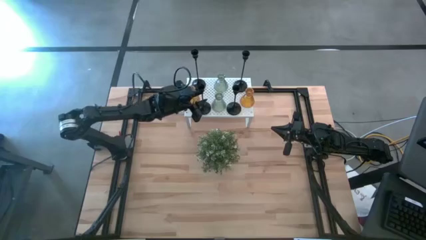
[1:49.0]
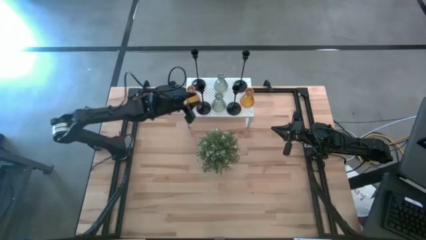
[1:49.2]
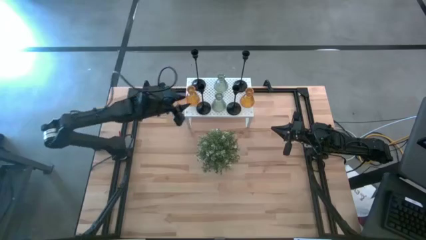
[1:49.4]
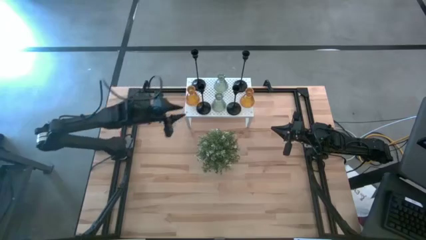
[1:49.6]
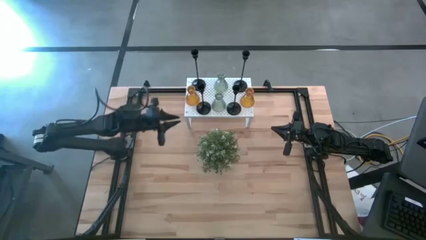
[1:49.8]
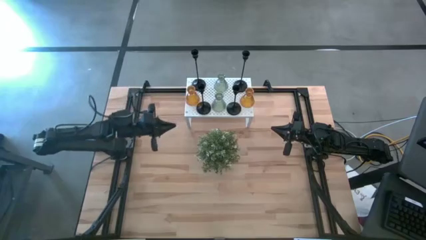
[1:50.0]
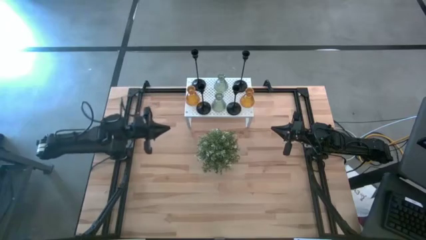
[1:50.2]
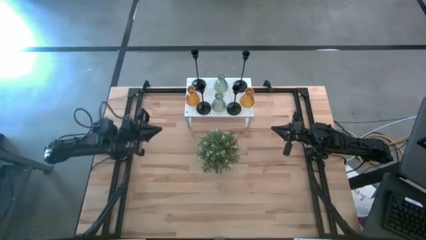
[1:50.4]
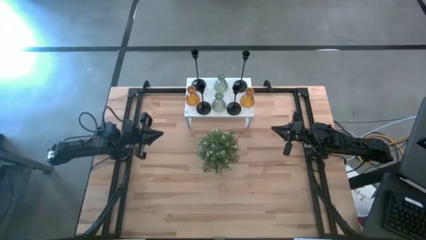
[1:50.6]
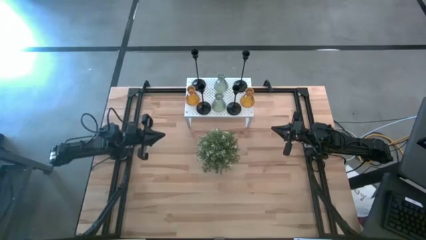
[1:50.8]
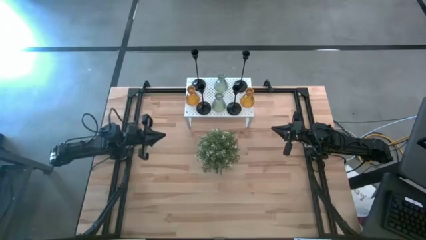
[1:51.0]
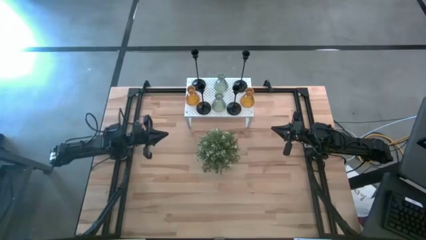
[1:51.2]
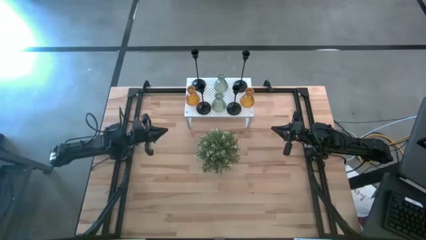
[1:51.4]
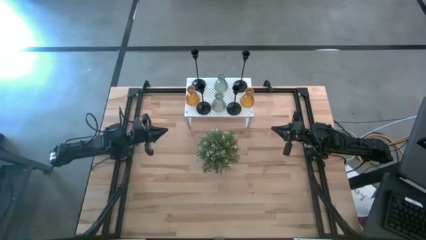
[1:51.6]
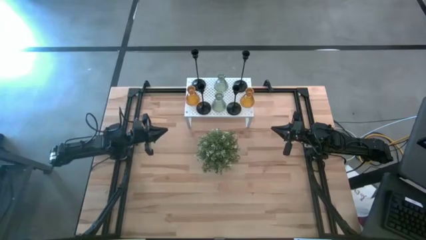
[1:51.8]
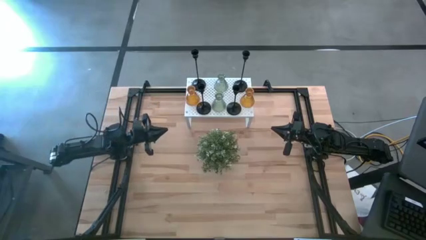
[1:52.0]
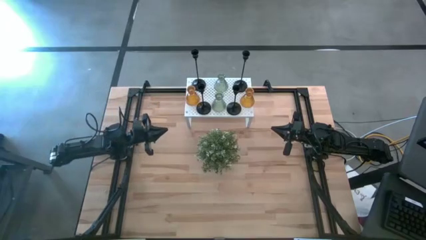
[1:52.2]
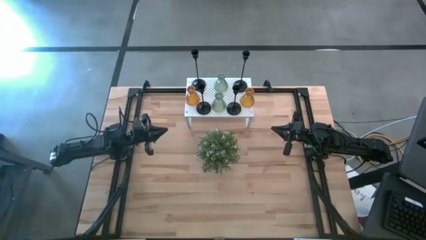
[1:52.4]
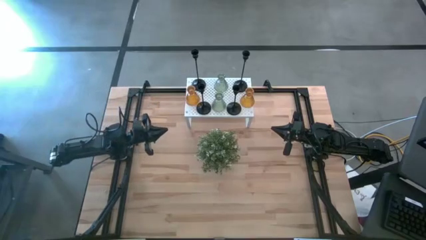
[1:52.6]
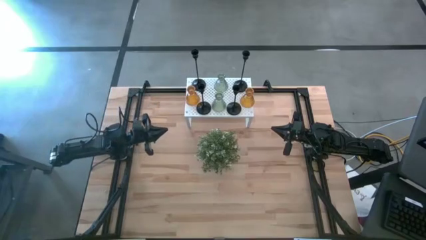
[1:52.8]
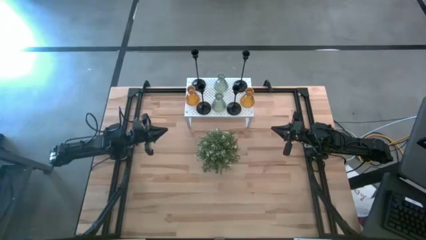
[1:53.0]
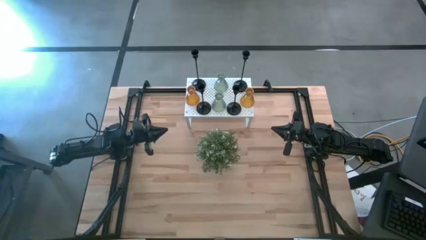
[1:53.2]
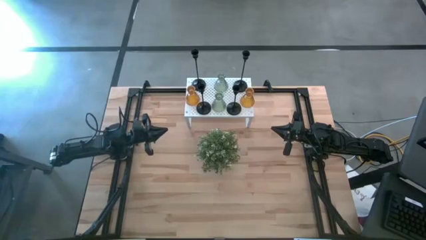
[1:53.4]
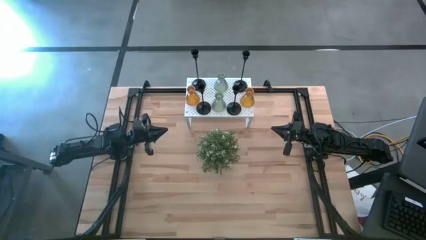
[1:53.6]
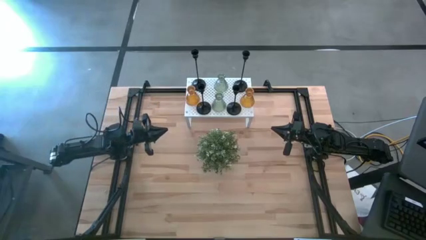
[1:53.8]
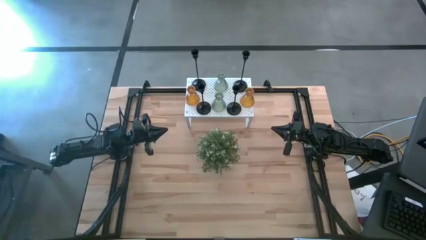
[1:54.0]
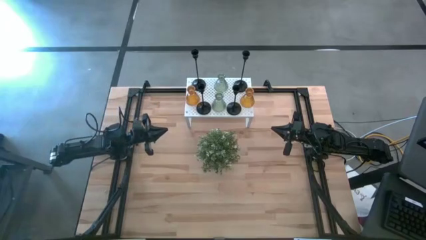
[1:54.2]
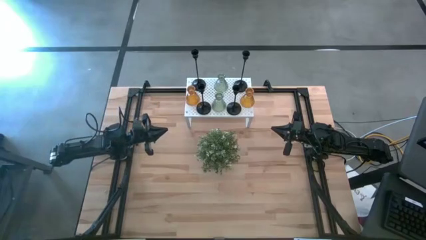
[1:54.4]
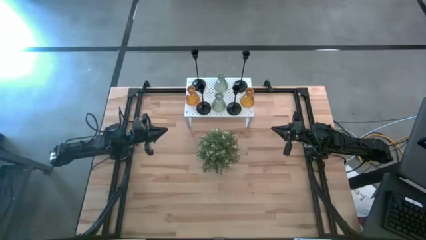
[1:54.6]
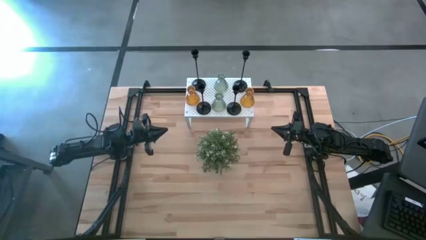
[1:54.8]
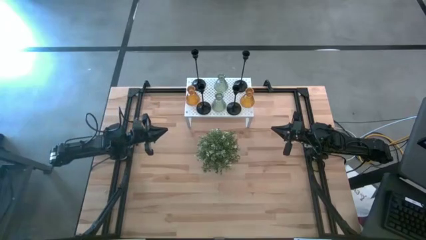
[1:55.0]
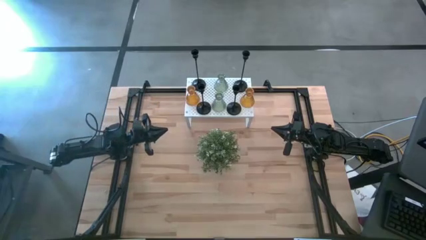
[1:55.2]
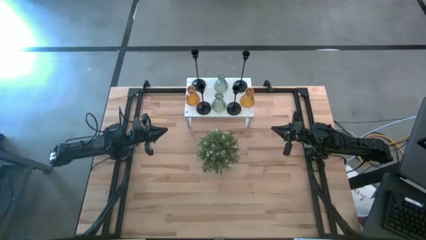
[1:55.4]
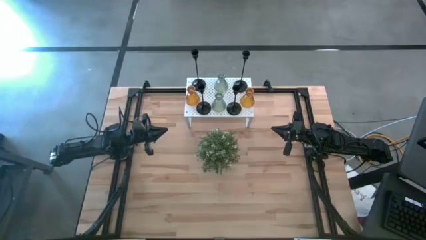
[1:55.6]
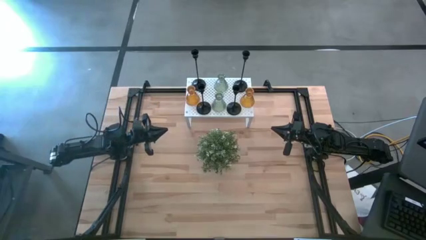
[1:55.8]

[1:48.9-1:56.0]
Task: Pick & Place candle stick holders
Return to Home Position

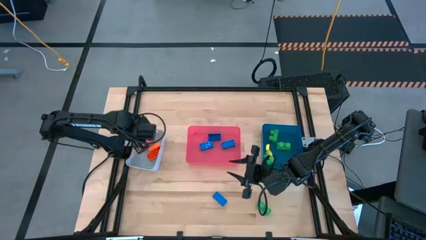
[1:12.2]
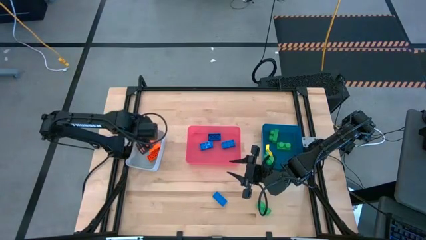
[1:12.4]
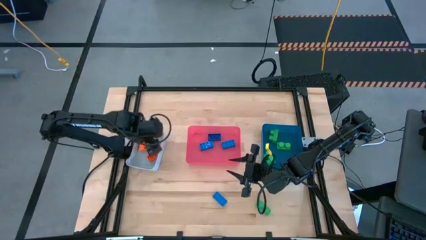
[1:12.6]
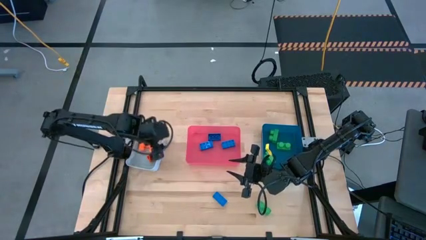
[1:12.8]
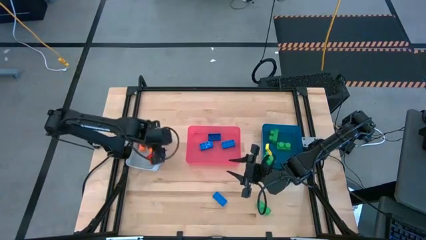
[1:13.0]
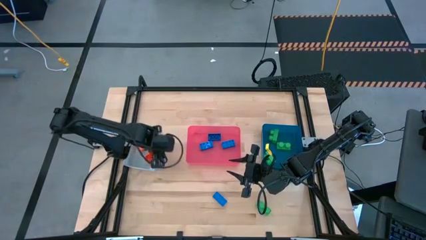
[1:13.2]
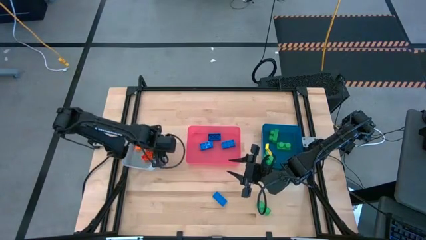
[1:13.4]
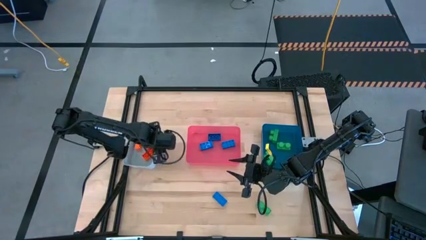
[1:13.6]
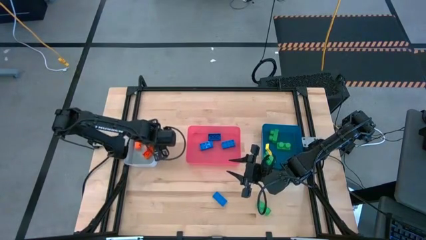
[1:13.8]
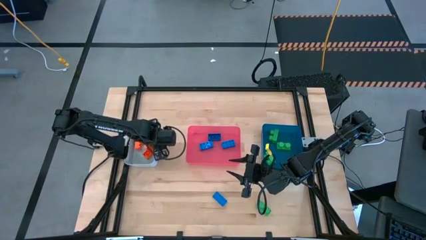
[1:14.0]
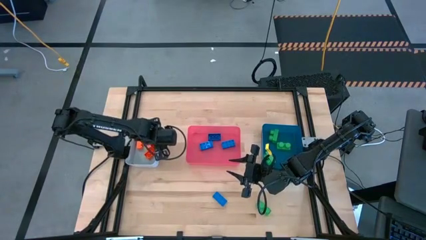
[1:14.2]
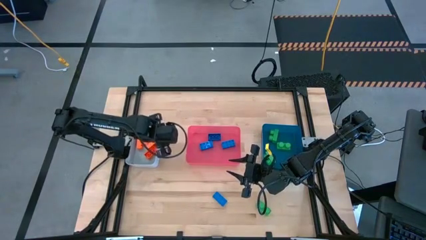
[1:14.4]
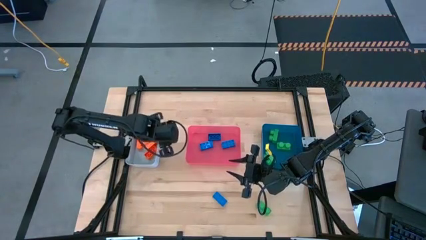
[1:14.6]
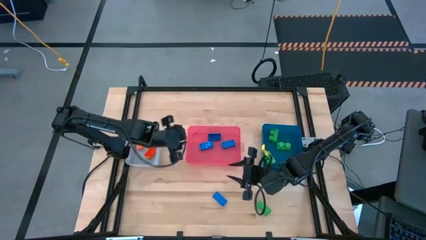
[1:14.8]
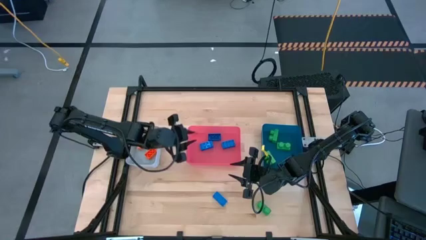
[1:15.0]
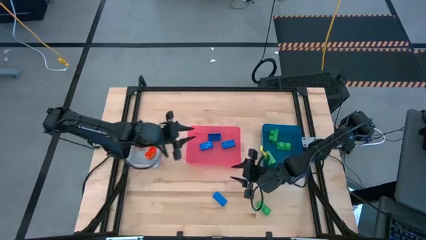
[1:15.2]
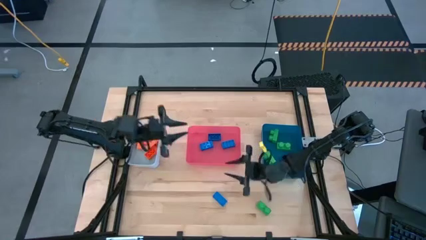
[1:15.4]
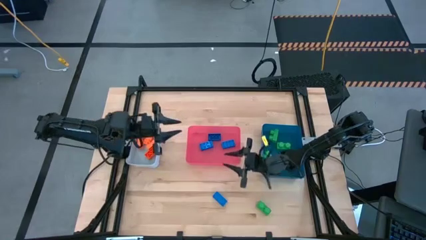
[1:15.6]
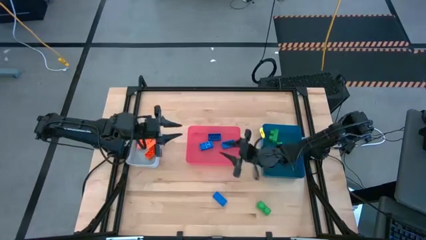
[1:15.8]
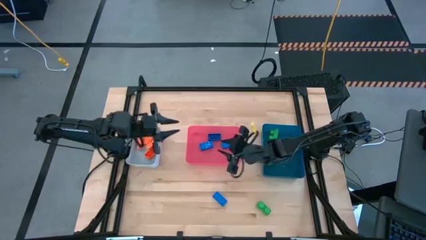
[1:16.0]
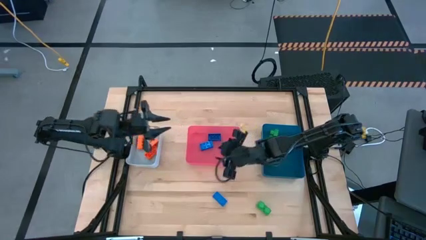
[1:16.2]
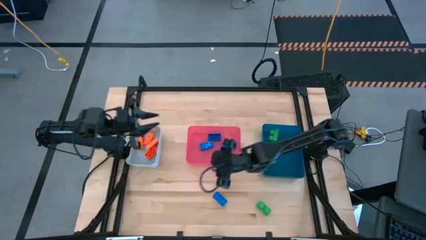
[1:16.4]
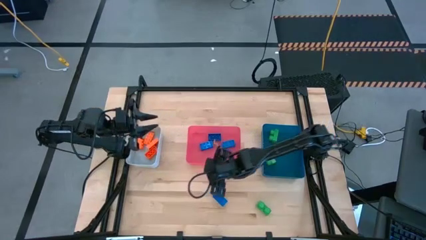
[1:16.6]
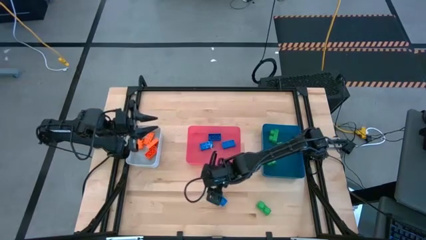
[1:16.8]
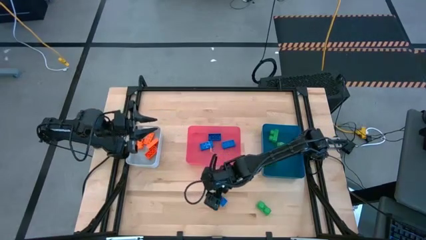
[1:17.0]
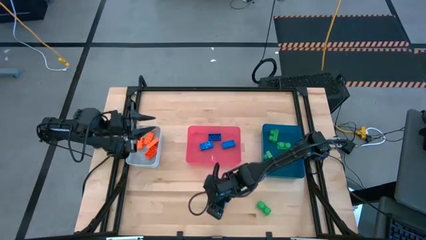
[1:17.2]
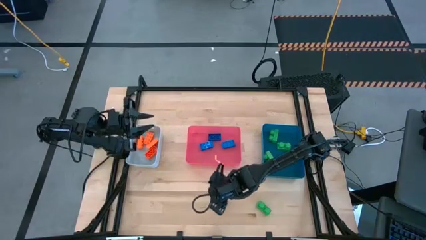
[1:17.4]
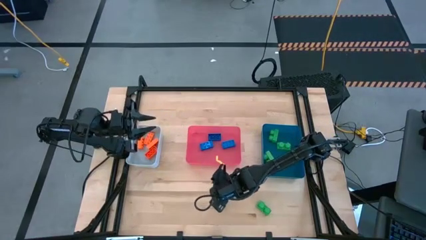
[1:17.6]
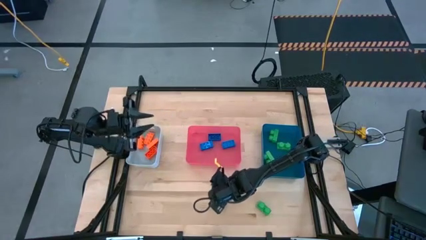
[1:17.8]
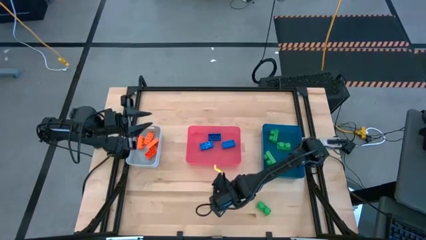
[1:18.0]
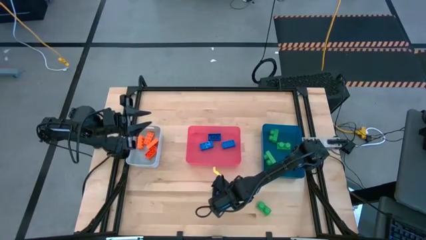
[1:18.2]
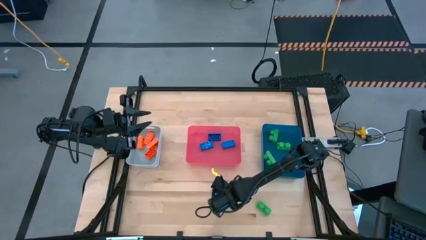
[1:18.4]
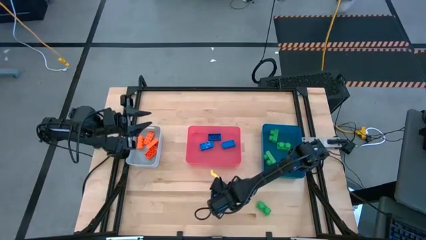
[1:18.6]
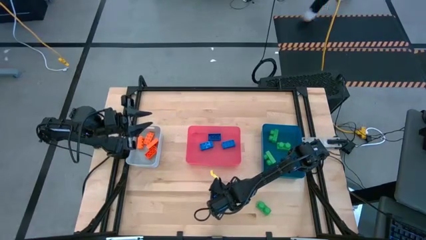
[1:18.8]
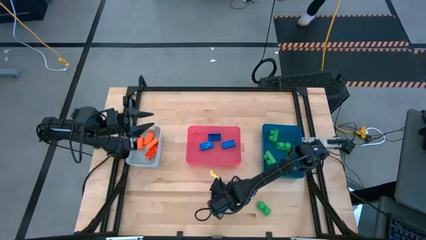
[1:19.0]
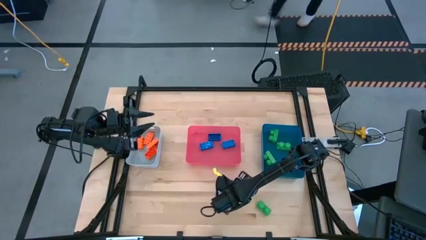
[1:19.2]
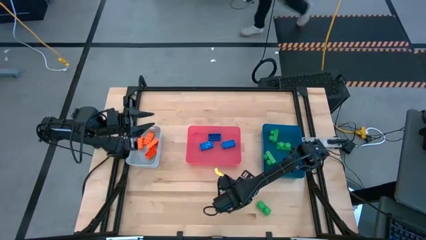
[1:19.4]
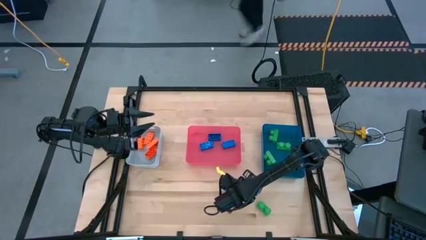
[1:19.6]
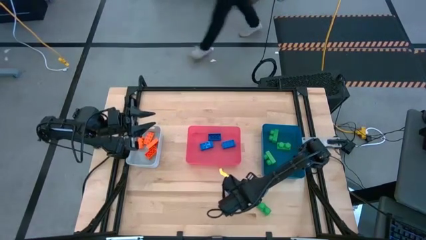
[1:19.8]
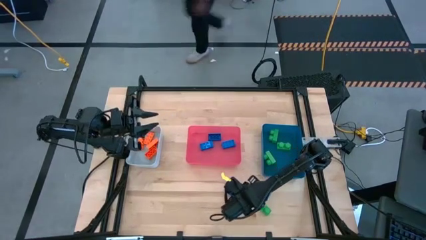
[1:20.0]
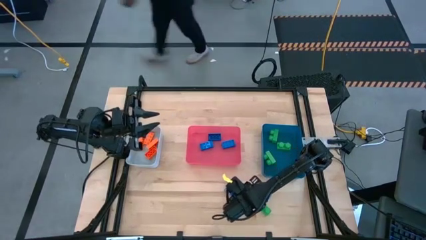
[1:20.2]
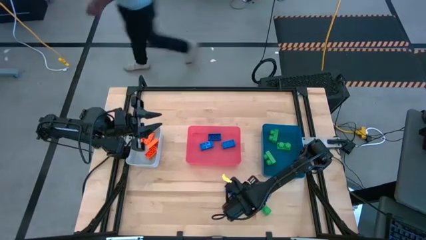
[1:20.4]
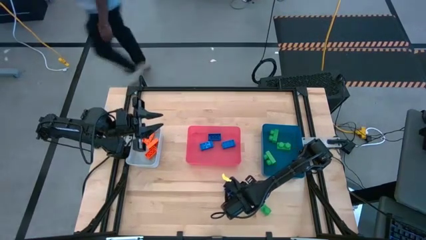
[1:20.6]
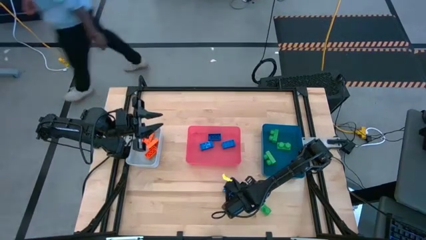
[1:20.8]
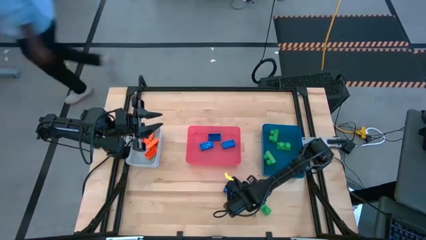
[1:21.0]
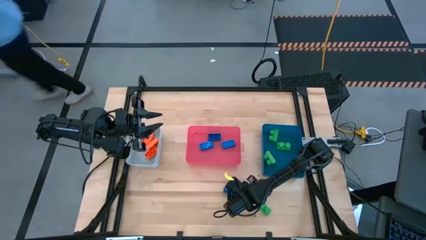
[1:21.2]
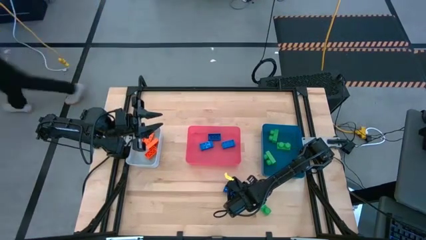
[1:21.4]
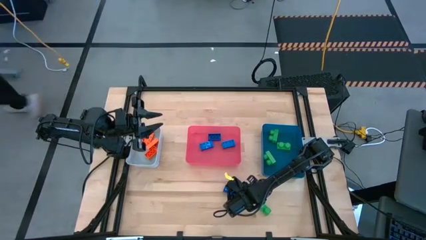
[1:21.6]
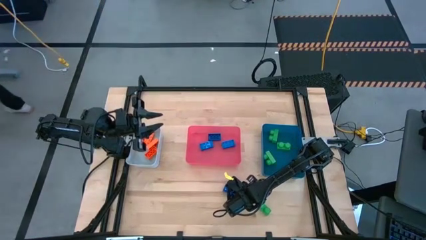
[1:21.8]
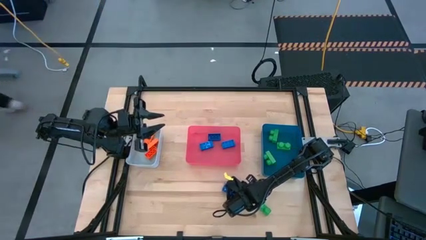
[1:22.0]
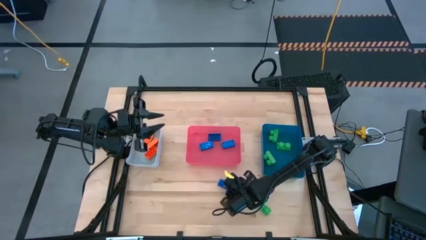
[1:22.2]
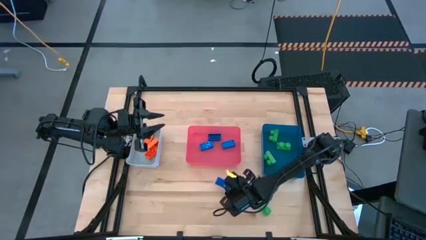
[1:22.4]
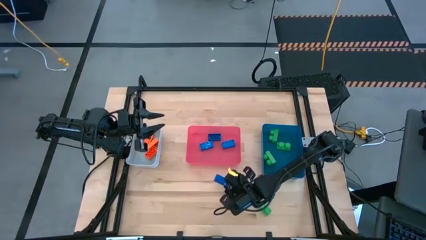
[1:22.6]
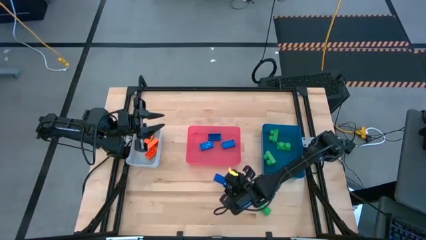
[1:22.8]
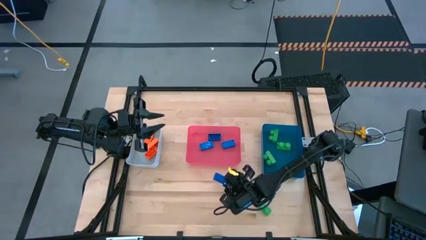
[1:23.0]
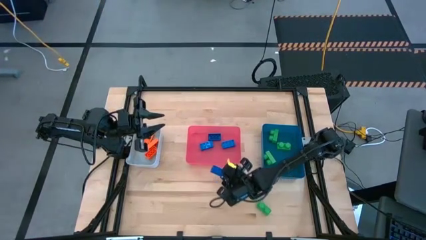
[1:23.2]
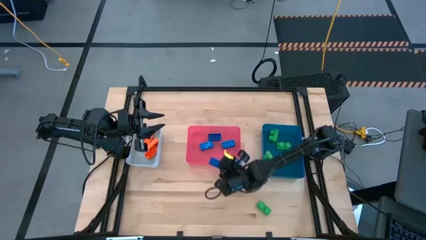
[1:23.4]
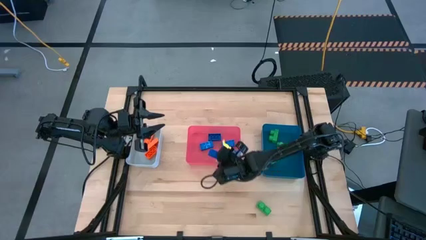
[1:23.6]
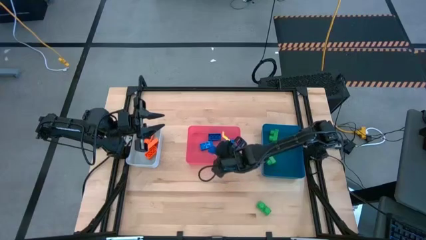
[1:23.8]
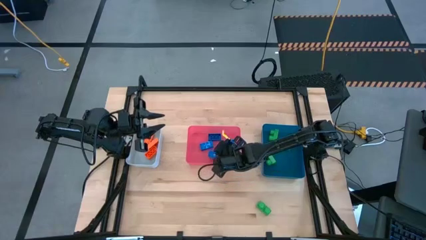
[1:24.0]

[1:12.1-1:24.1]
Task: Sort & place blocks by color
Put the blue game piece into the red bin
